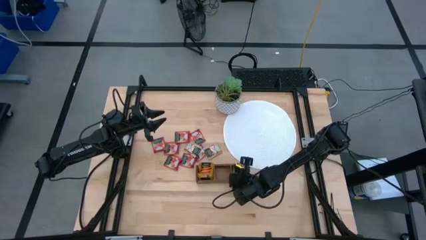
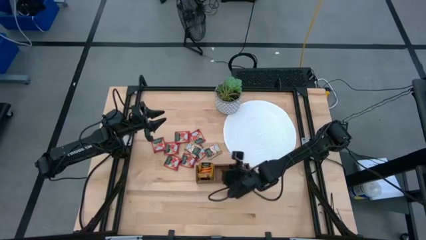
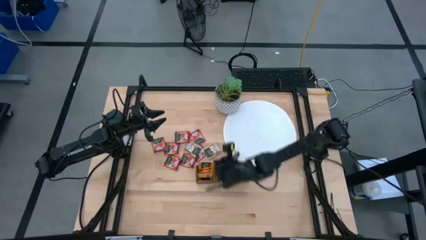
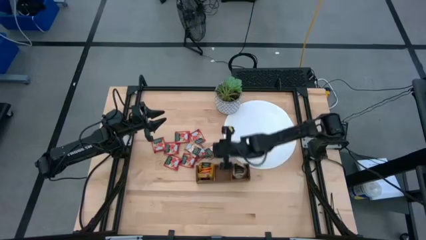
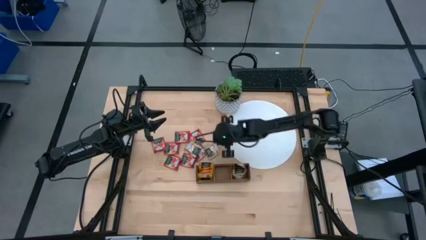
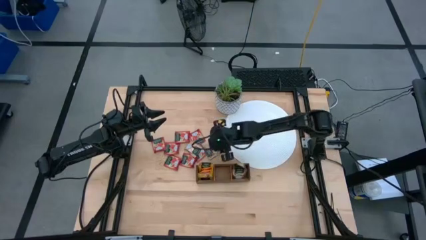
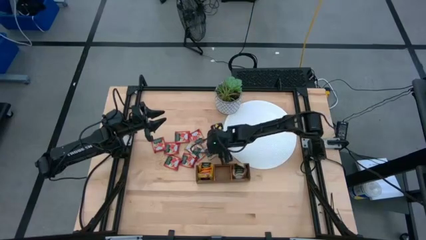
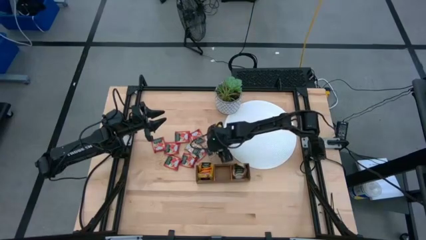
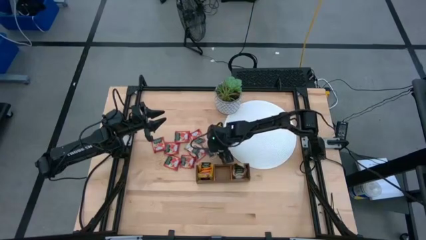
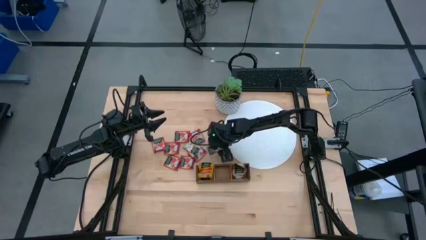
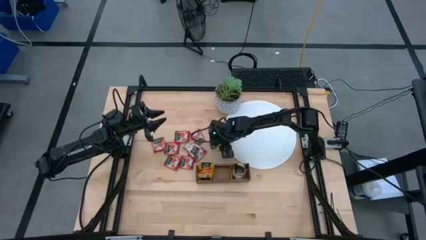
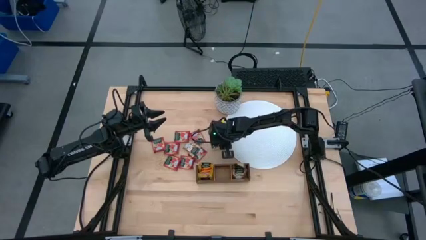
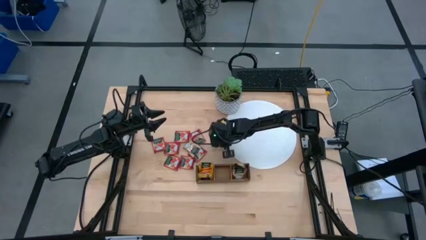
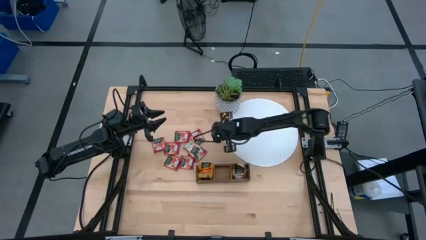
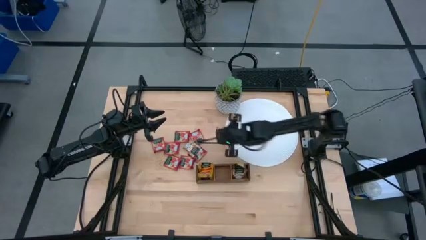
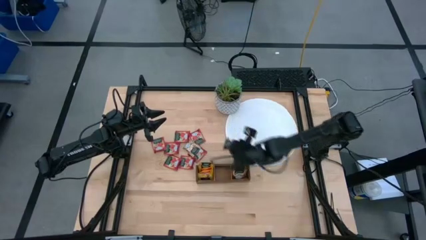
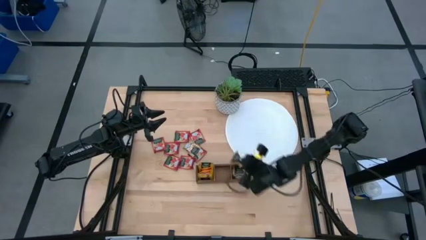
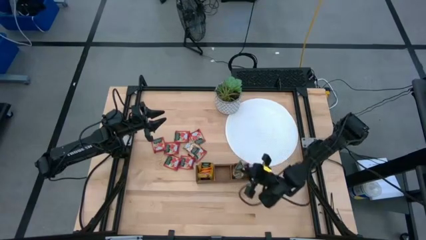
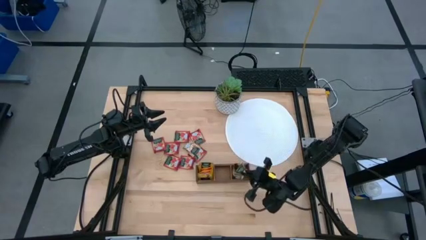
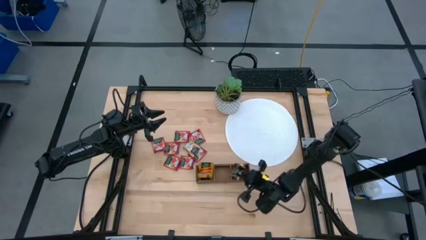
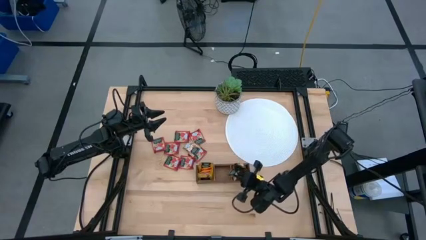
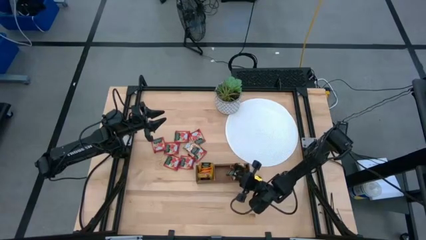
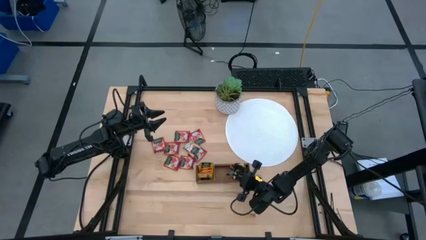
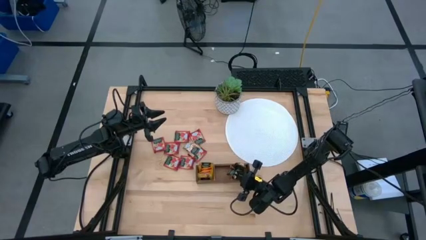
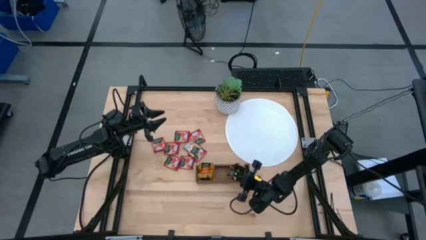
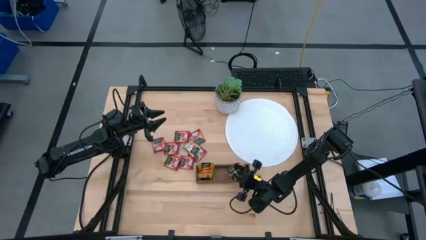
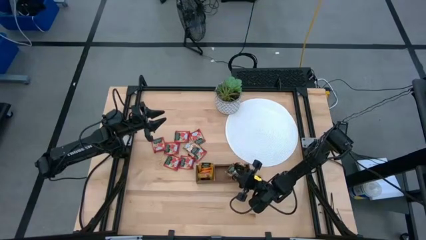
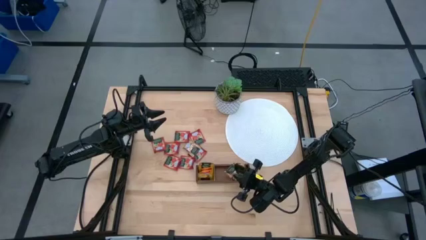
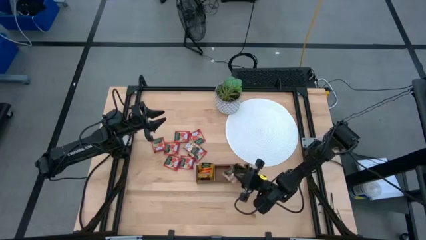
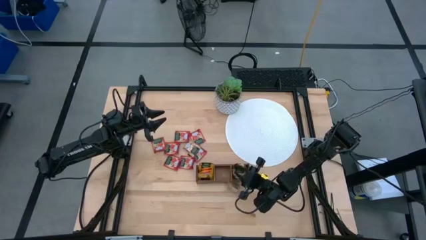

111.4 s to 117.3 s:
Task: Pick & Place Tea
Put the light brown tea bag into the right section of the wooden organizer

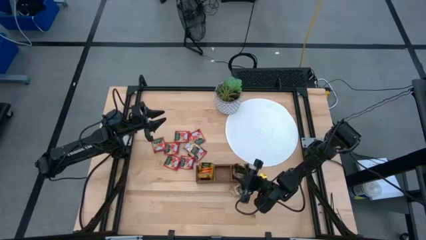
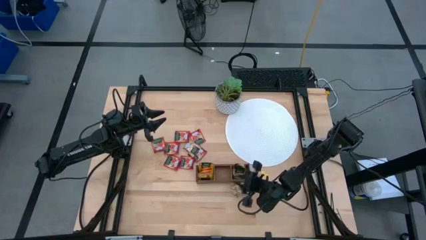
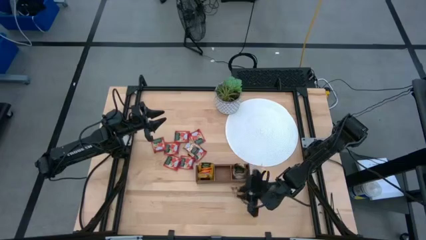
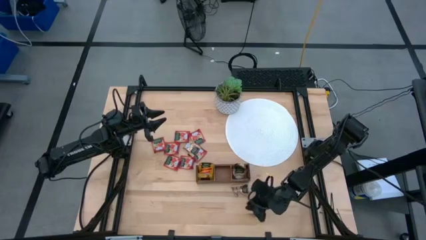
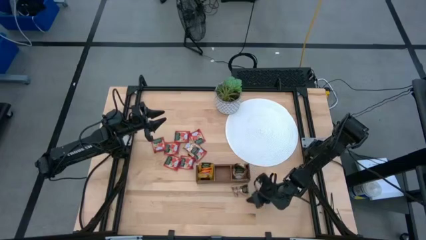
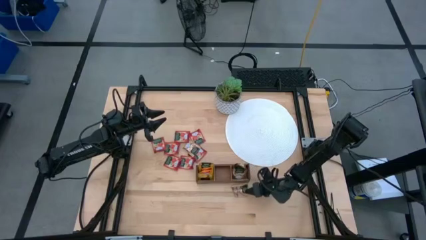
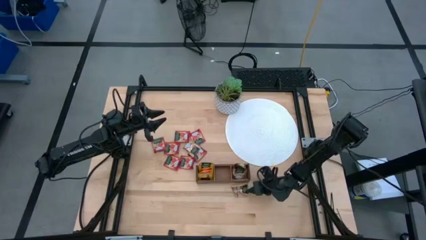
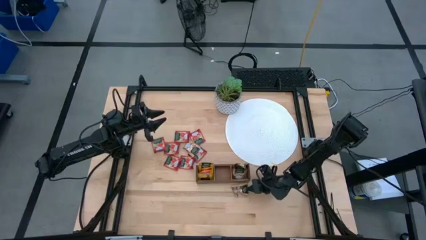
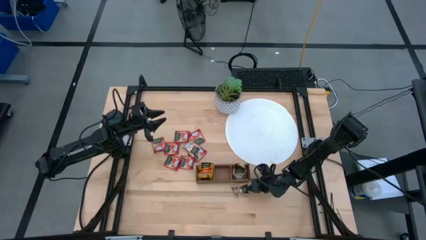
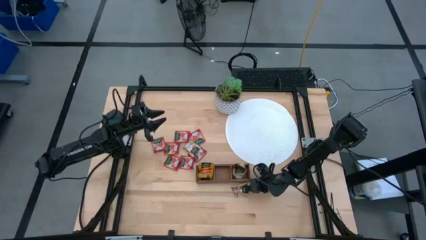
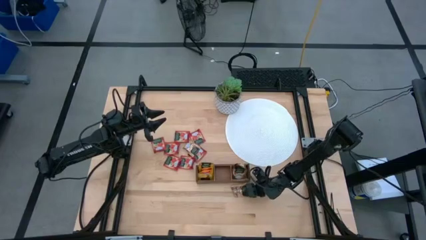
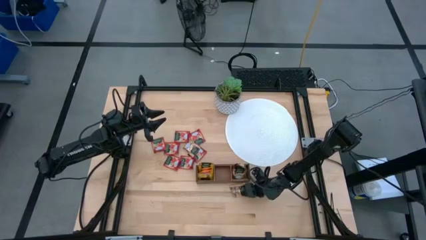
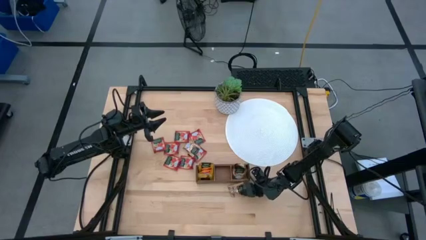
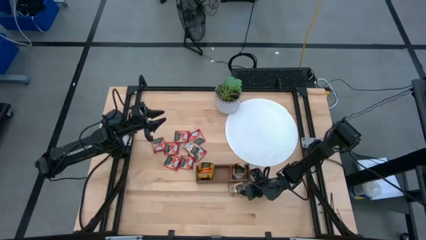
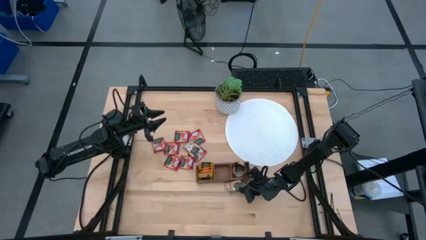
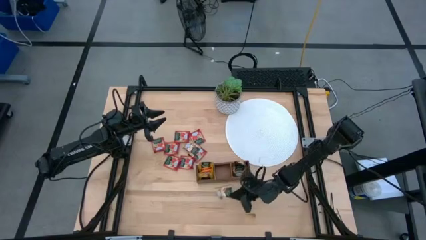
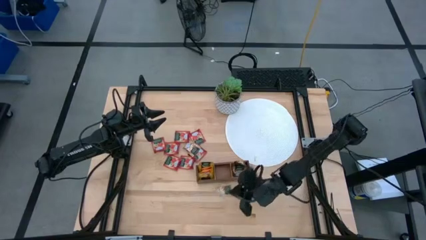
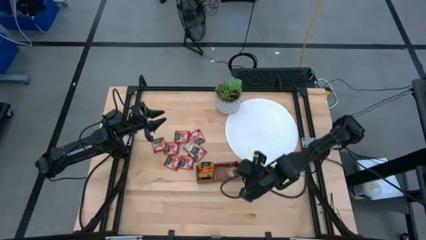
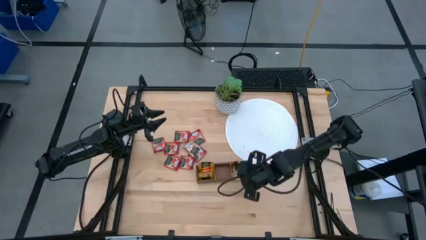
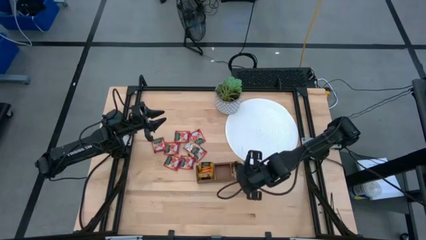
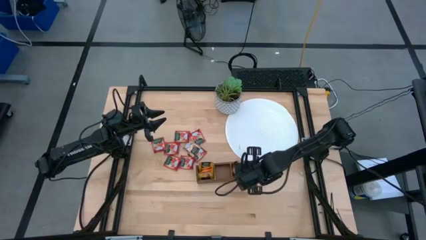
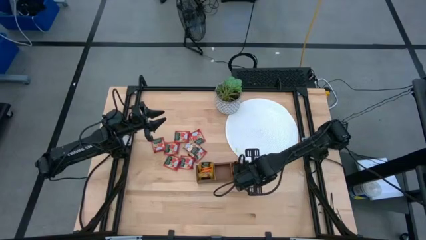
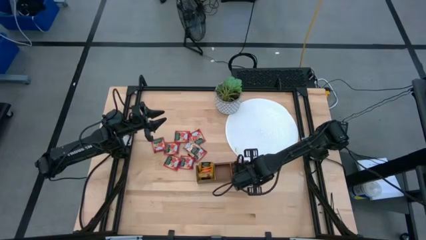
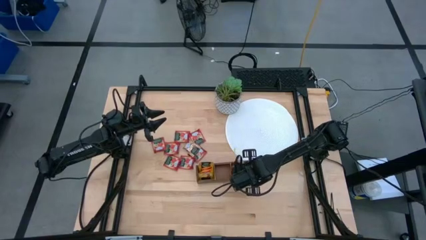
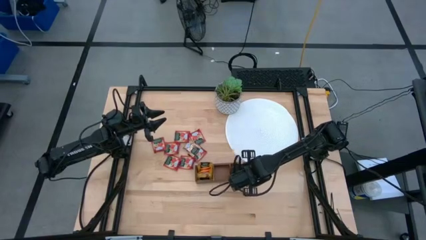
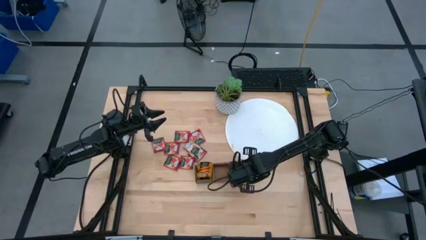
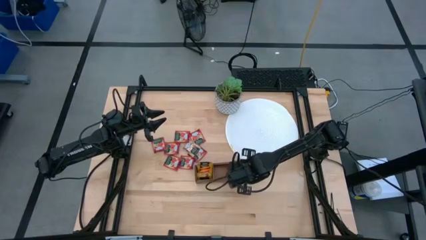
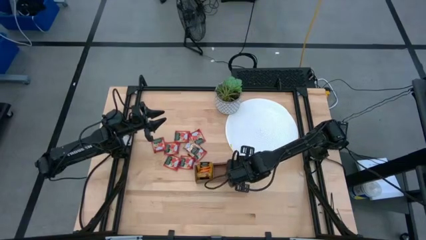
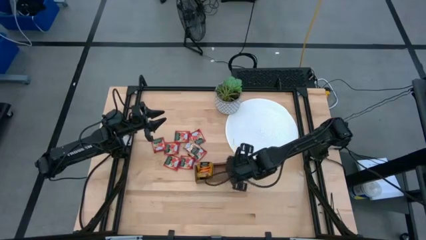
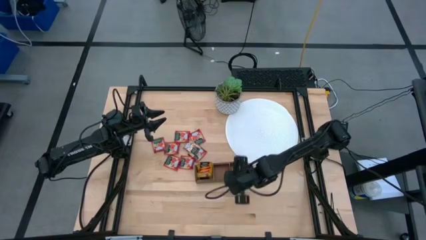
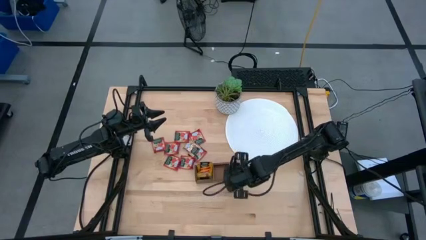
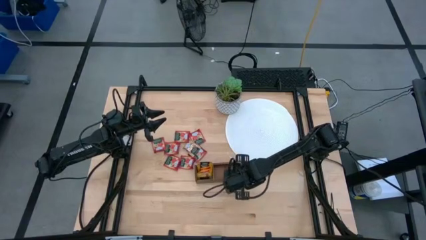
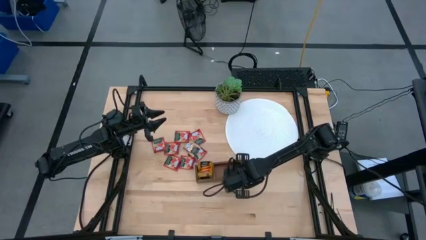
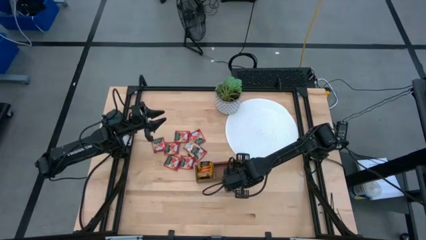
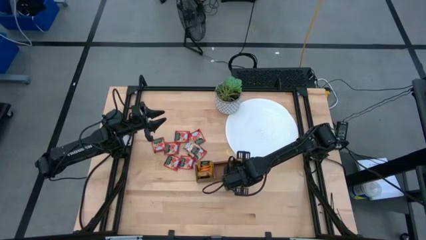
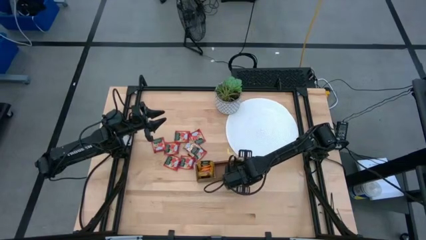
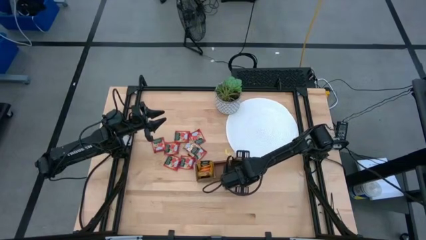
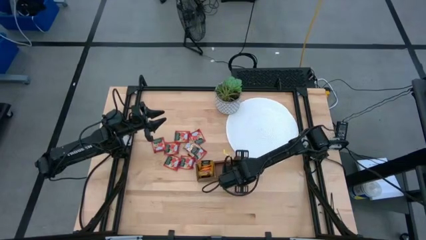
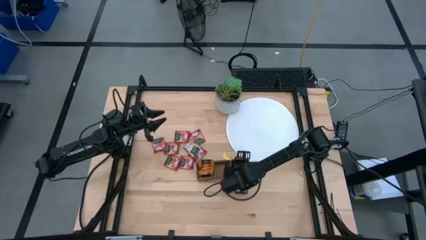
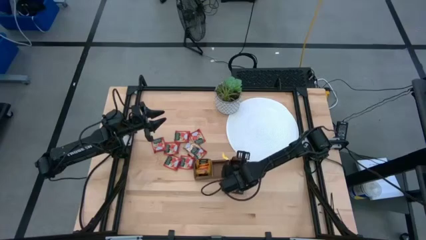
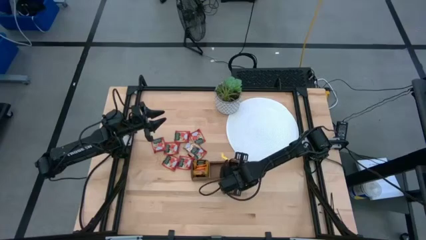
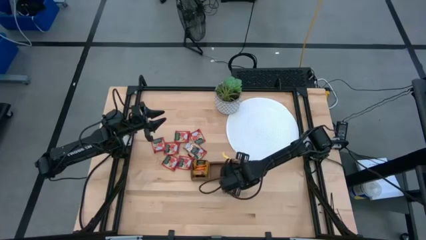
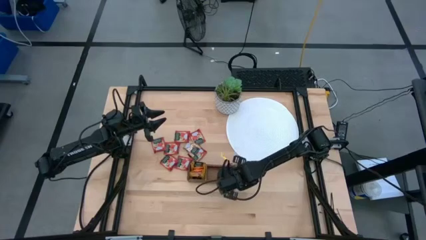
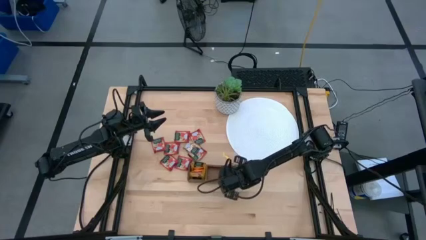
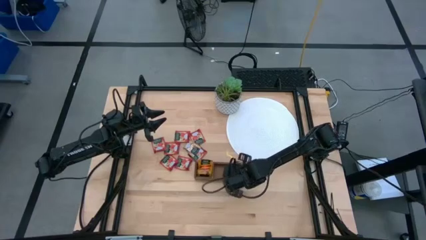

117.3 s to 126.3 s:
Put the light brown tea bag into the right section of the wooden organizer

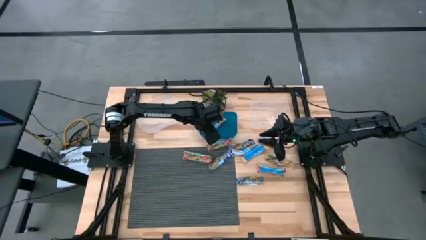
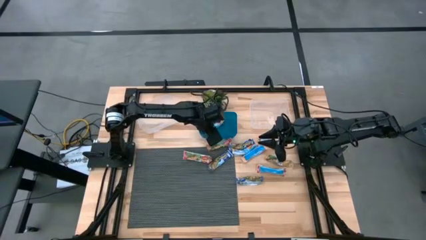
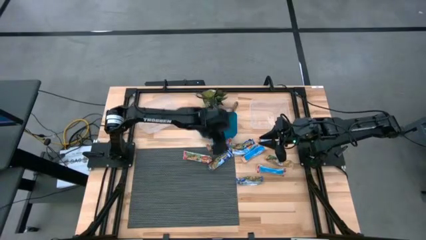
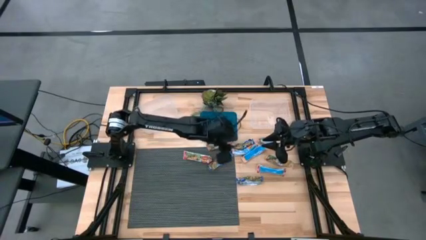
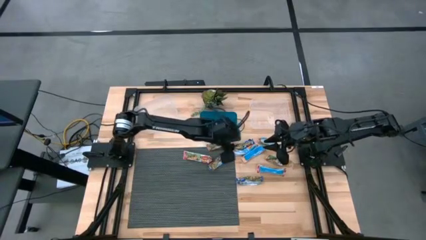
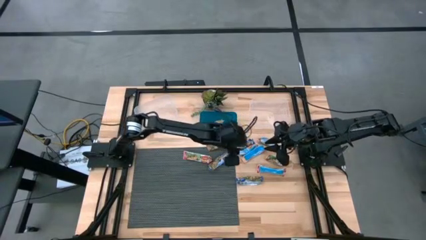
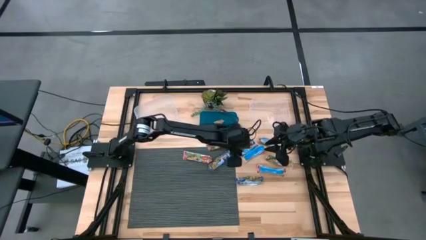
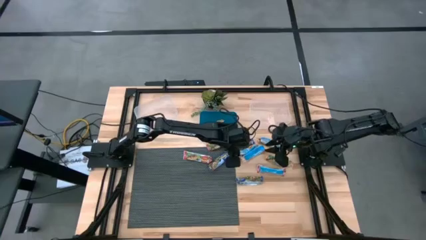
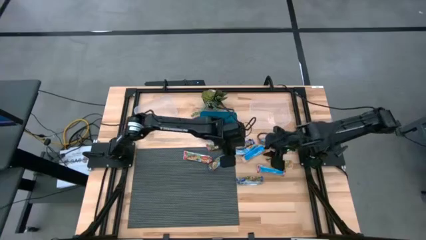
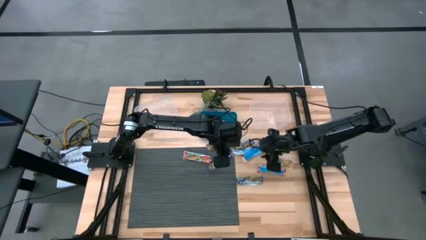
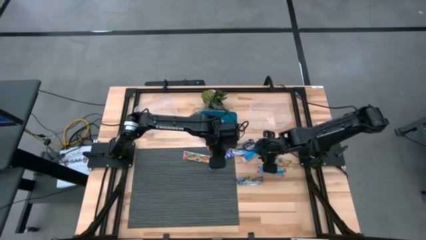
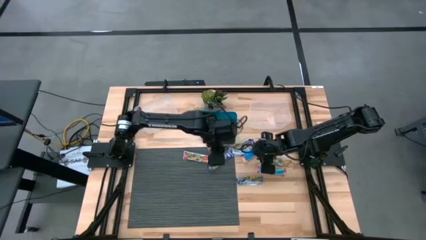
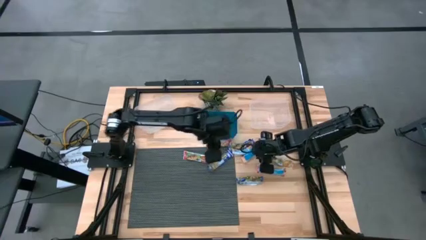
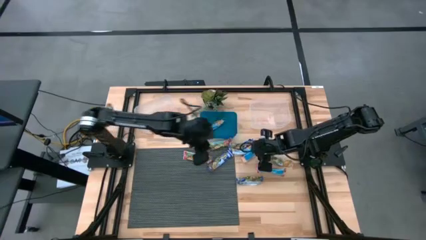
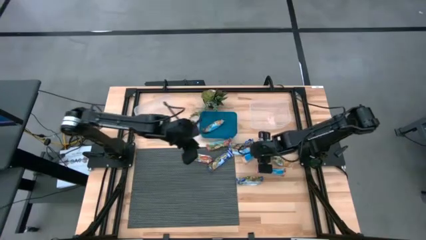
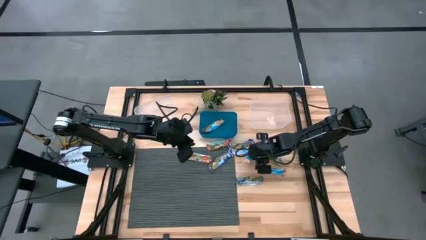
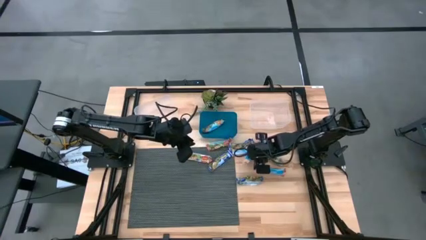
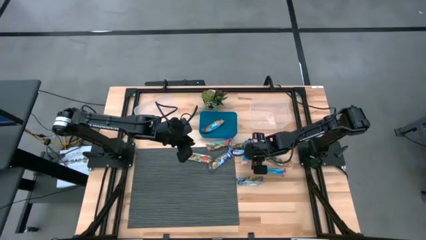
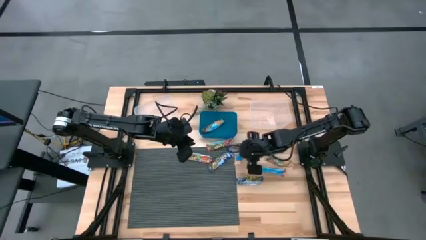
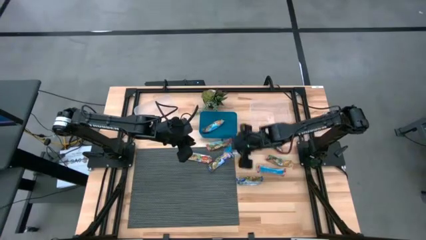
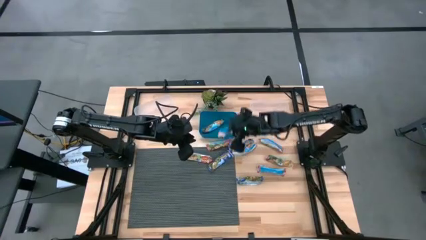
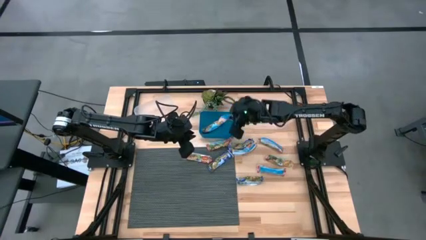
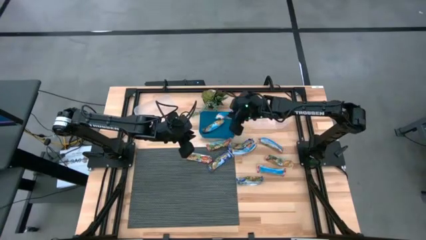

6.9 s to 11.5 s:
Task: Pick and place Granola Bars by type
Put the yellow granola bar into the blue bin
